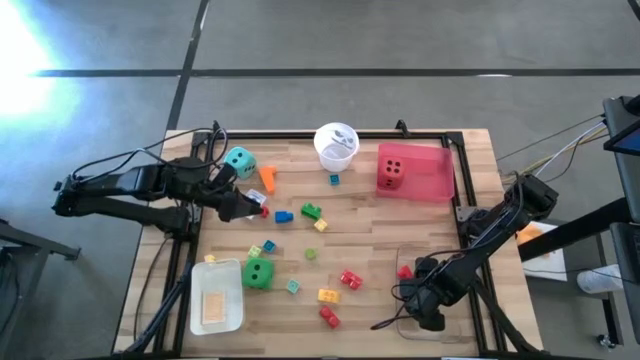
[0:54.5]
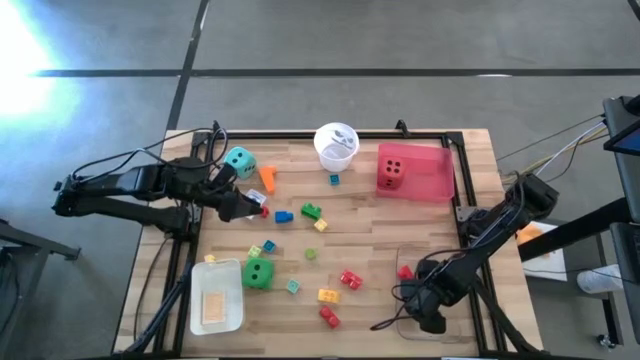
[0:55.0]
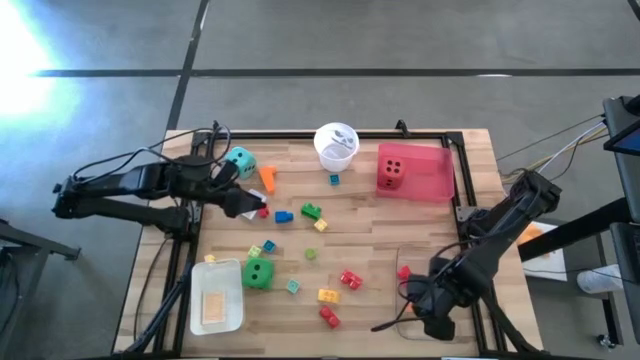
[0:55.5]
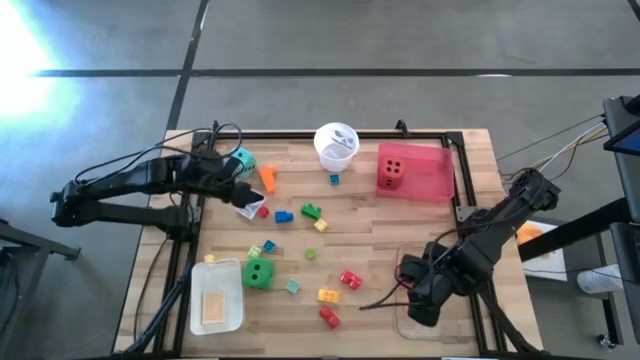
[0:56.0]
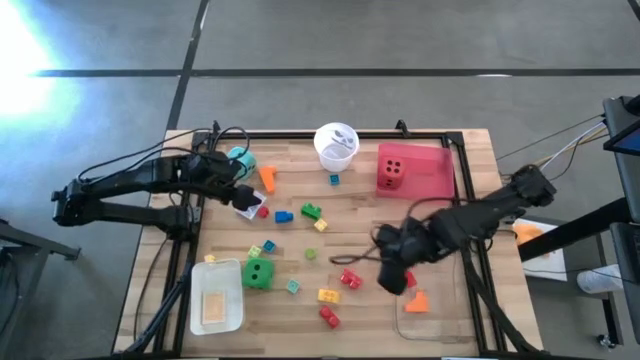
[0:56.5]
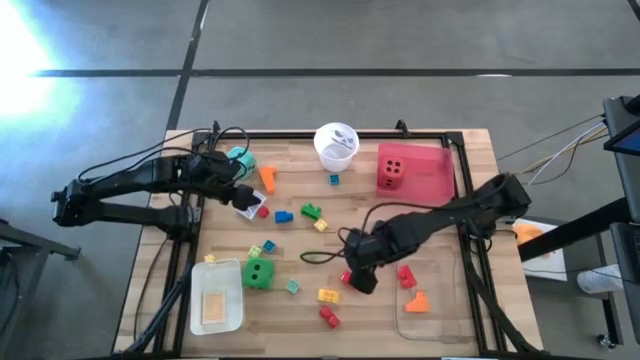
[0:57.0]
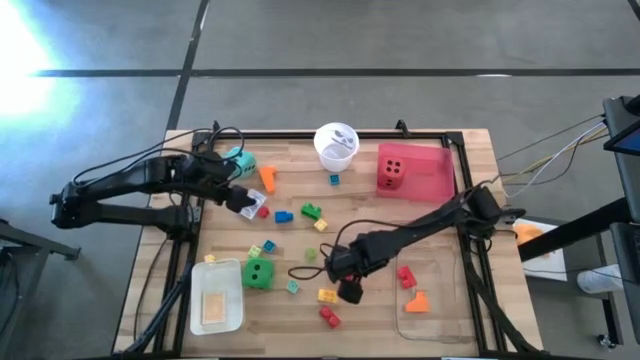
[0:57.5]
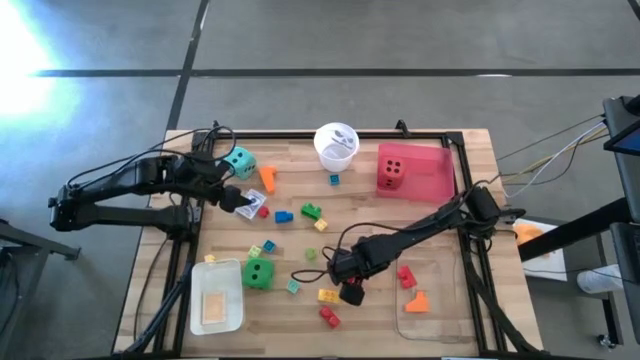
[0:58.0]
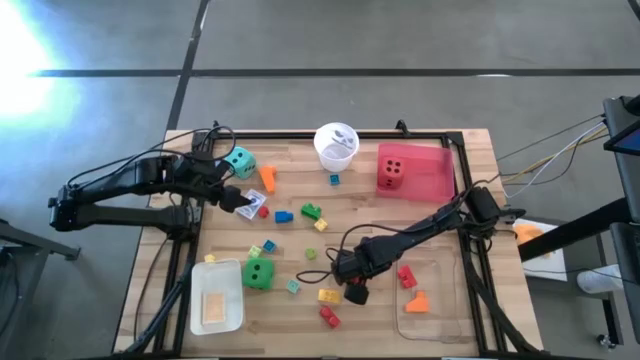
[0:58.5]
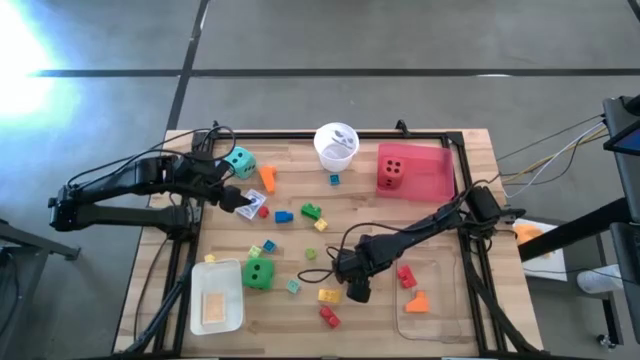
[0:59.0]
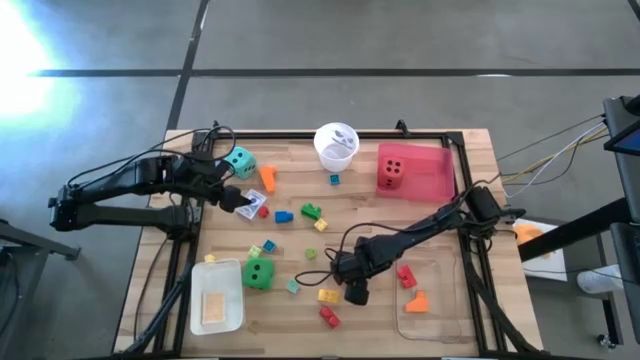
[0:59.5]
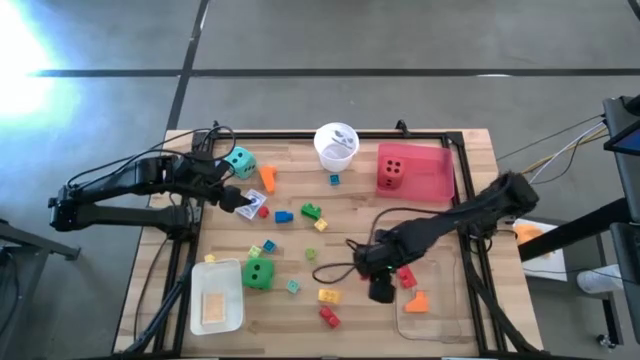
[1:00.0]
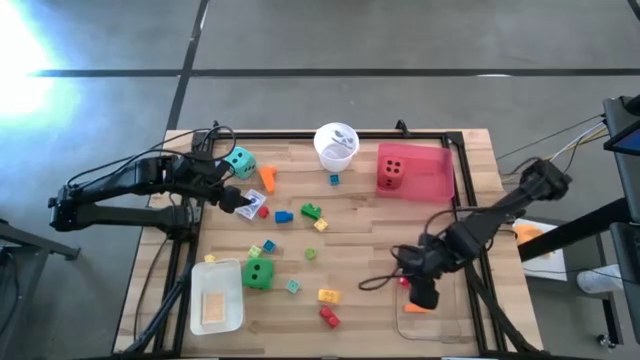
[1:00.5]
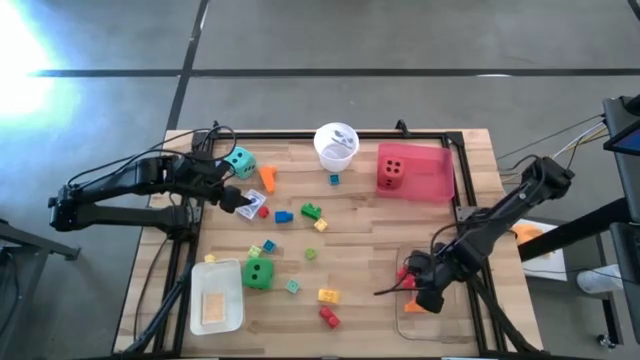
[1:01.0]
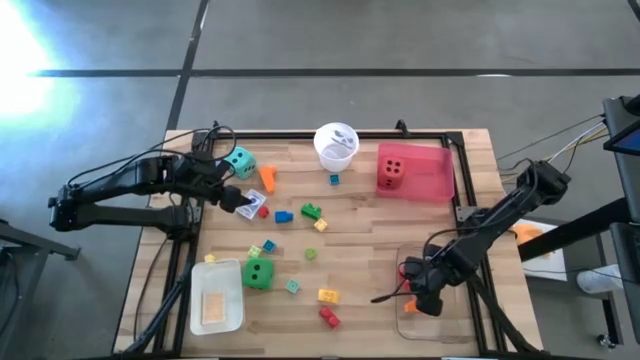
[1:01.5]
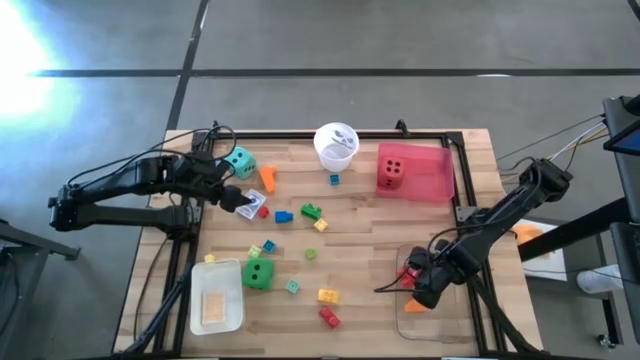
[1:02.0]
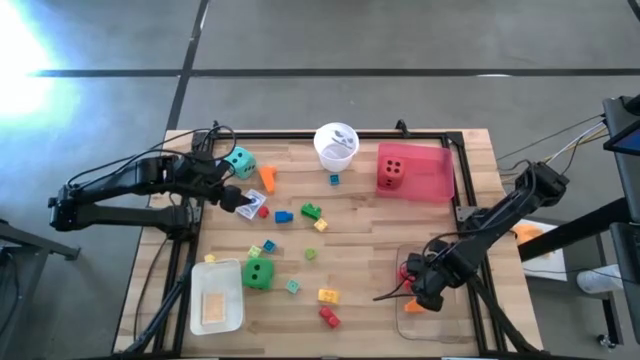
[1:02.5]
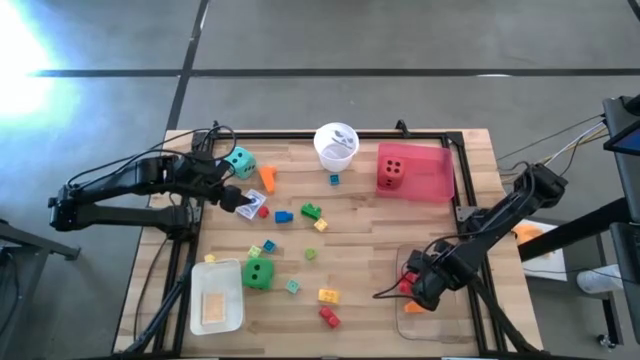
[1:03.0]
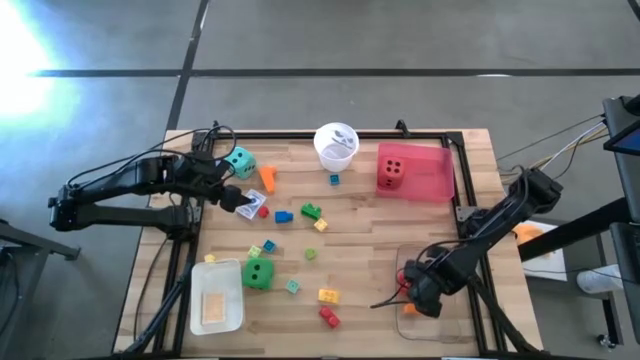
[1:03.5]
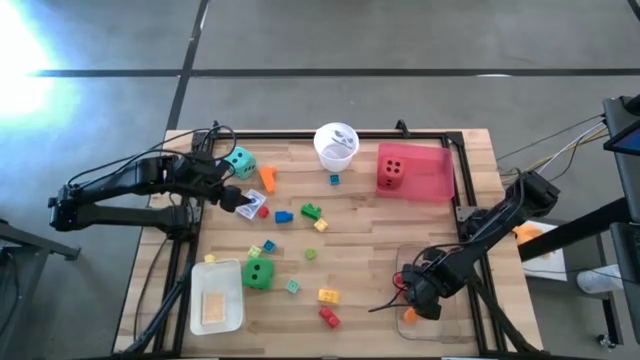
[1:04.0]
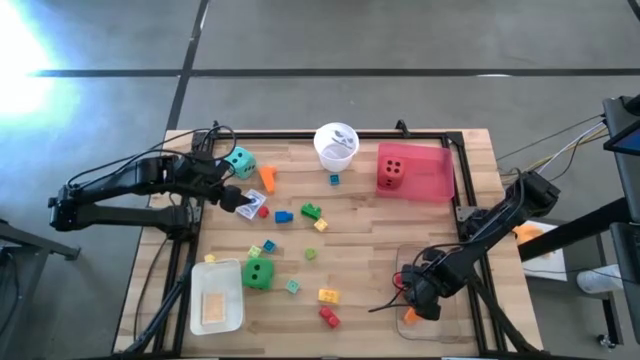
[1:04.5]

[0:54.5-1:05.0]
Task: Pick & Place Toys
Put the red game piece into the transparent bin

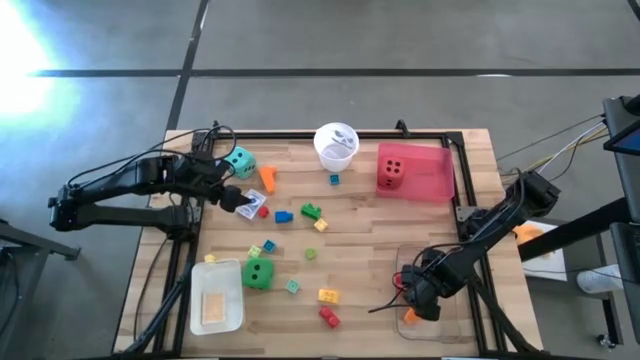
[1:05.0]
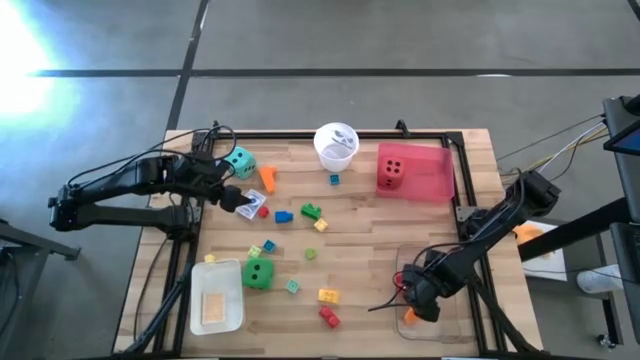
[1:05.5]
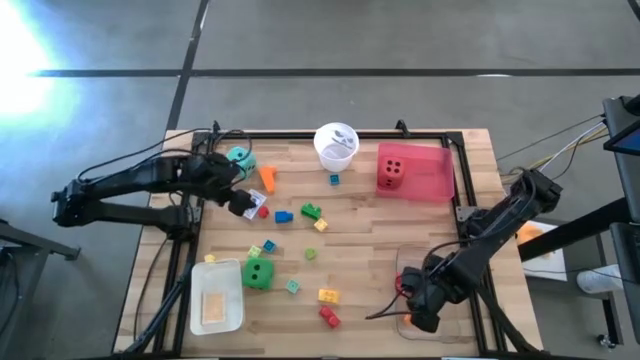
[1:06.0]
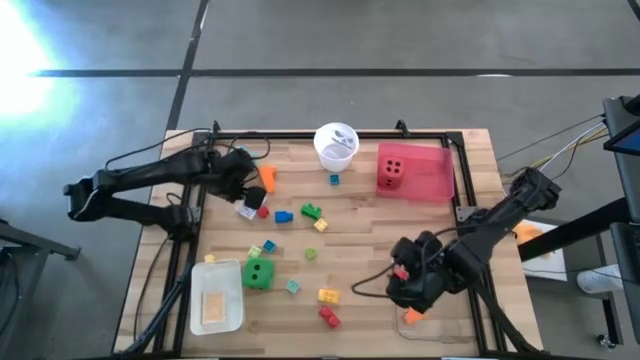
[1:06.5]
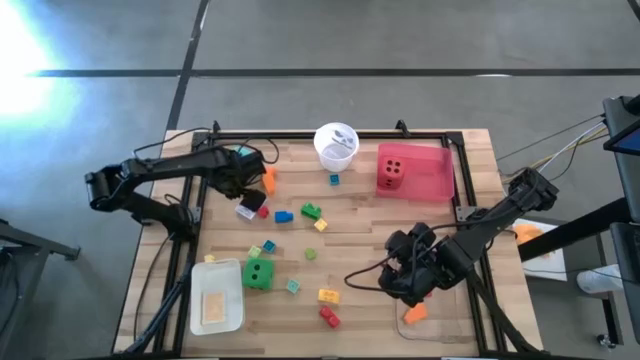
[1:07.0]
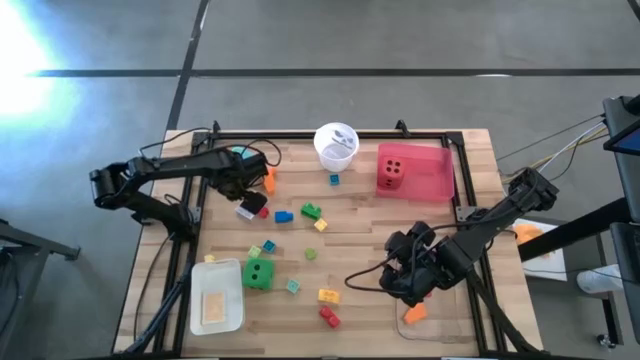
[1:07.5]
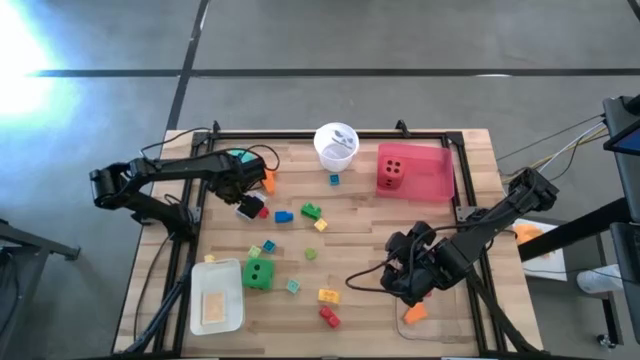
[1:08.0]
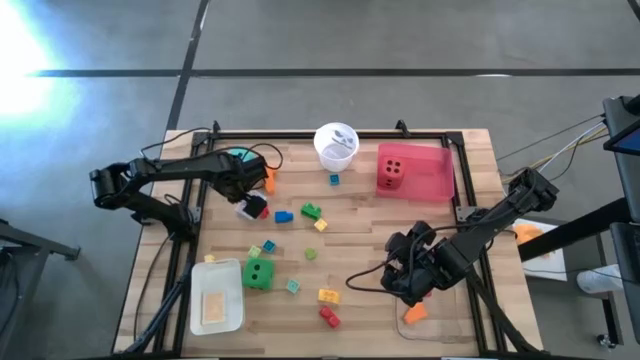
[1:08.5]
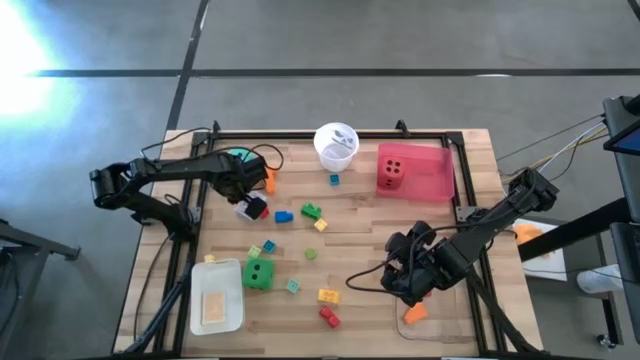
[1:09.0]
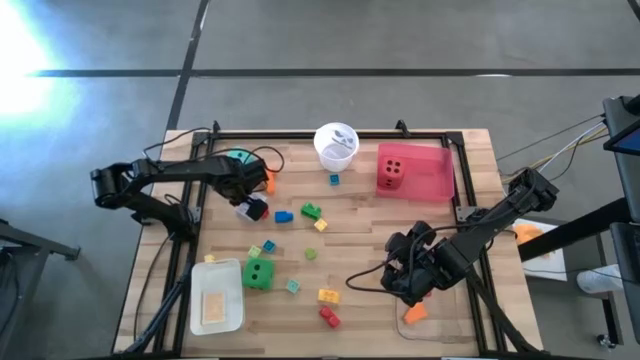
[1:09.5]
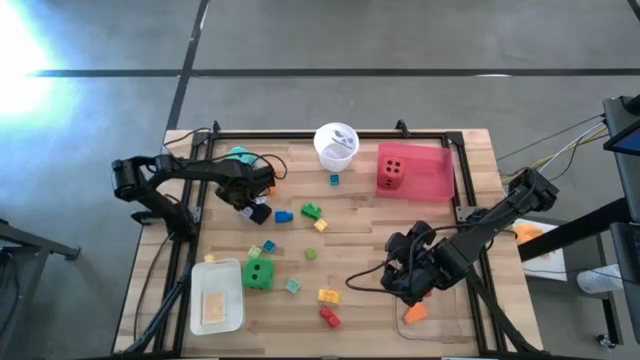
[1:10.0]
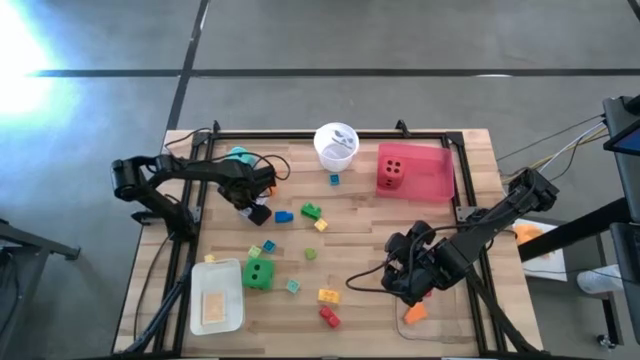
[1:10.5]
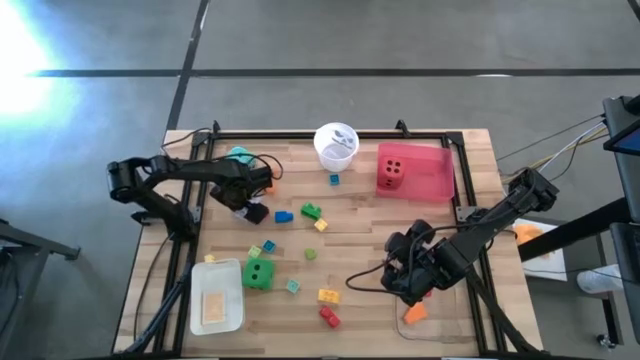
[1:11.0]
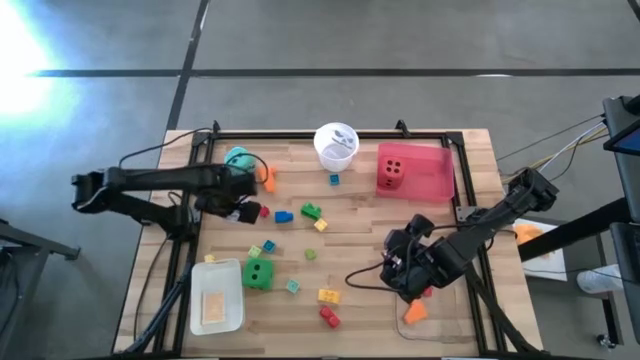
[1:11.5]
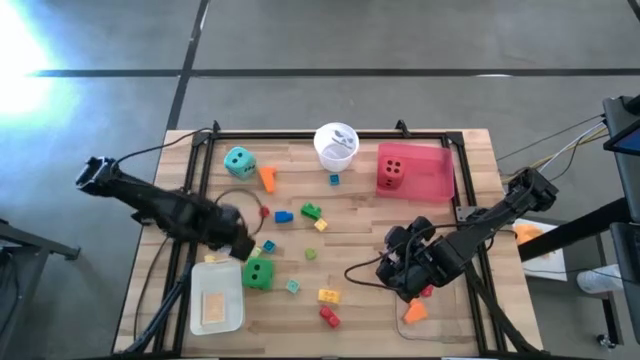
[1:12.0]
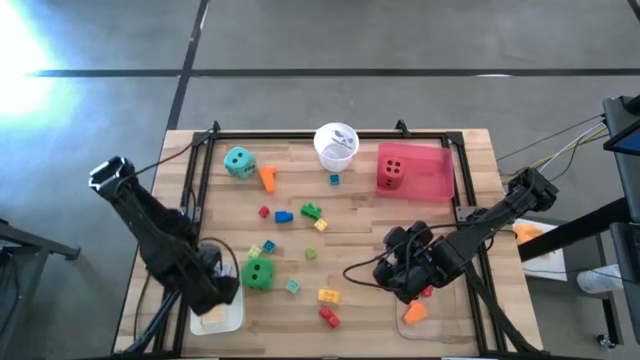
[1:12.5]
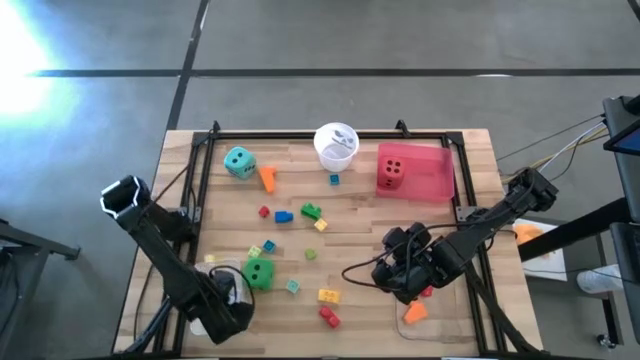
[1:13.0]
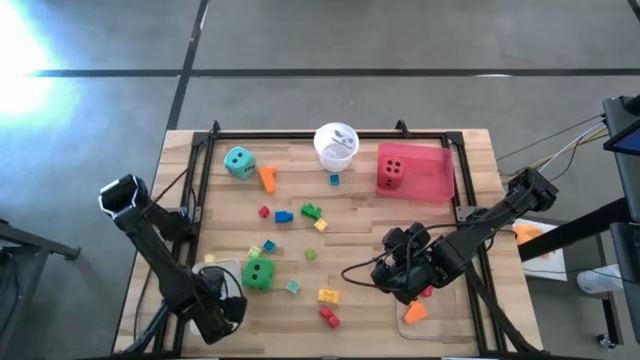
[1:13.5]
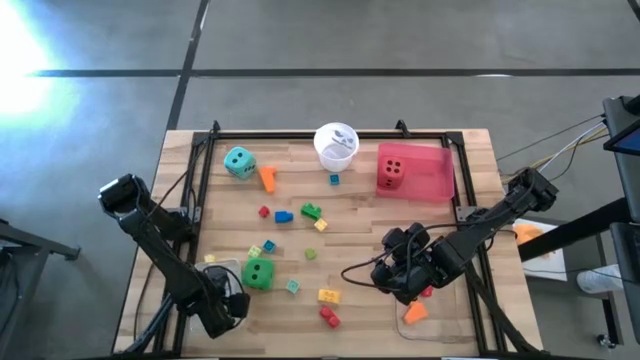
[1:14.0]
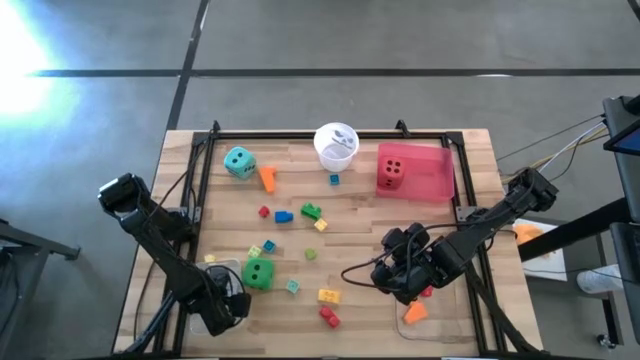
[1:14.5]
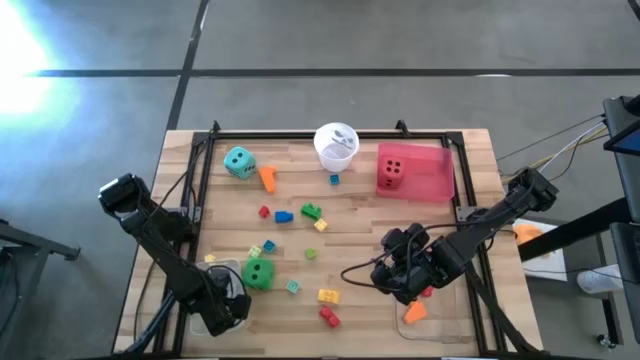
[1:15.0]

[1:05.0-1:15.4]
Put the blue deck of cards into the white bin
